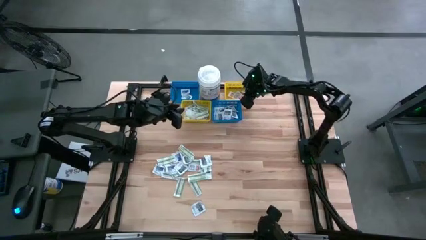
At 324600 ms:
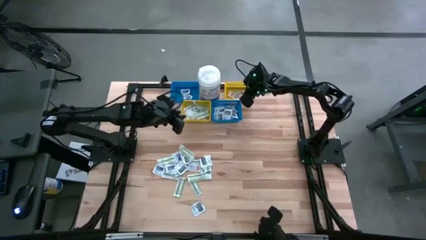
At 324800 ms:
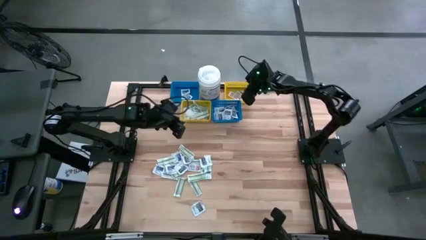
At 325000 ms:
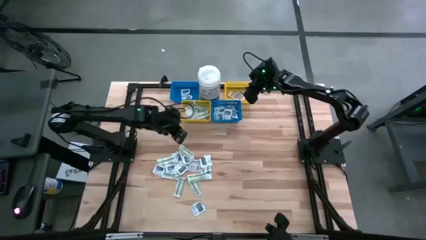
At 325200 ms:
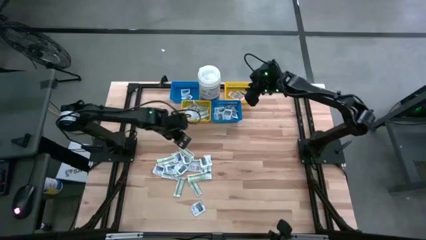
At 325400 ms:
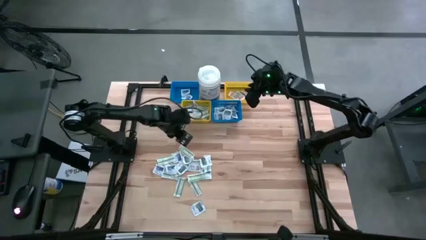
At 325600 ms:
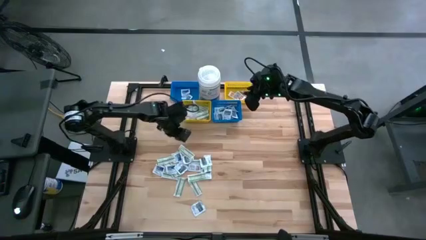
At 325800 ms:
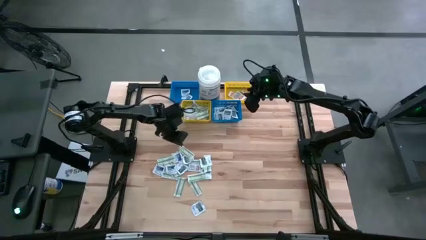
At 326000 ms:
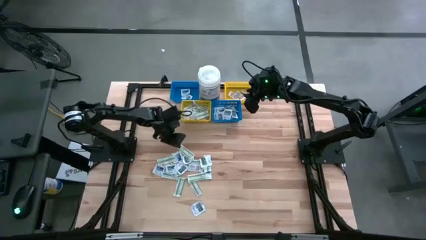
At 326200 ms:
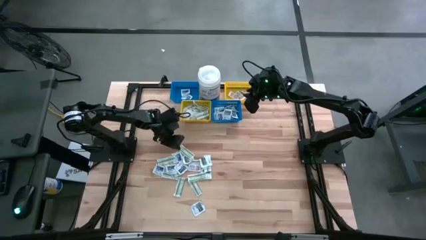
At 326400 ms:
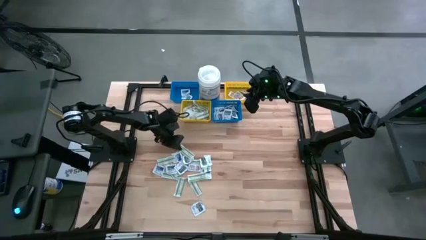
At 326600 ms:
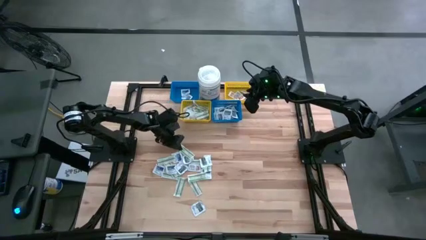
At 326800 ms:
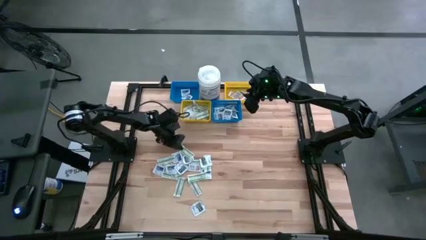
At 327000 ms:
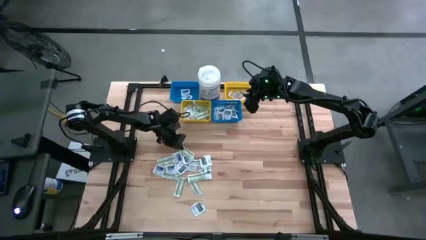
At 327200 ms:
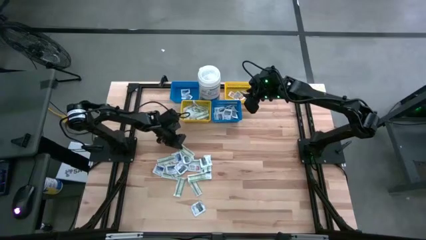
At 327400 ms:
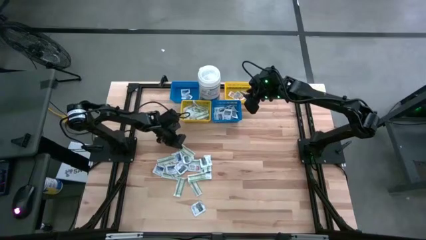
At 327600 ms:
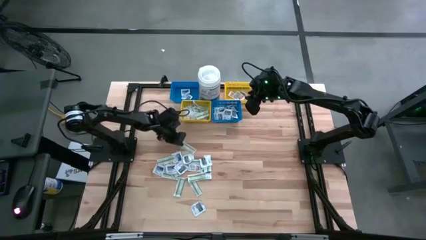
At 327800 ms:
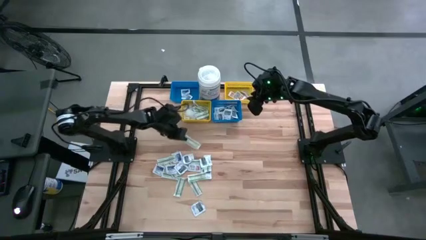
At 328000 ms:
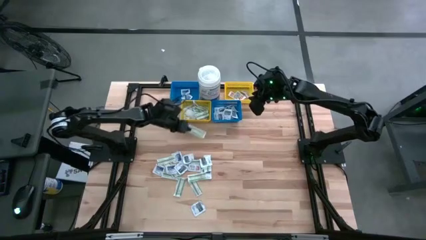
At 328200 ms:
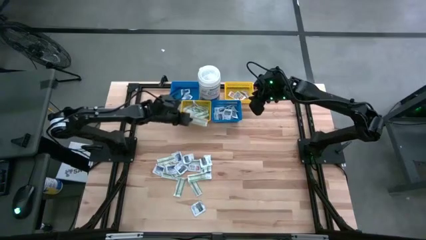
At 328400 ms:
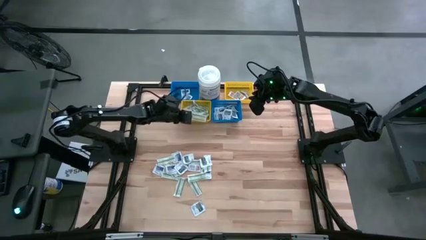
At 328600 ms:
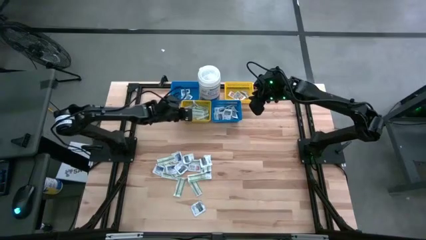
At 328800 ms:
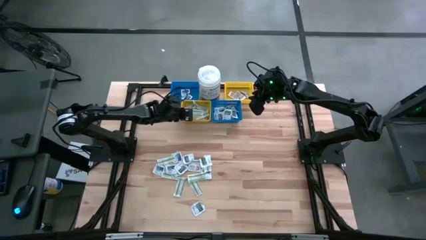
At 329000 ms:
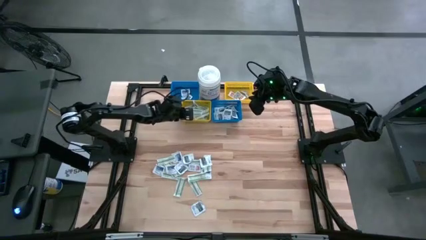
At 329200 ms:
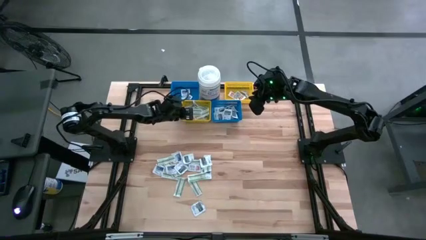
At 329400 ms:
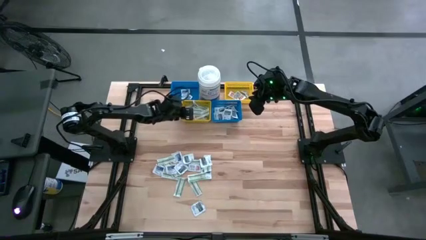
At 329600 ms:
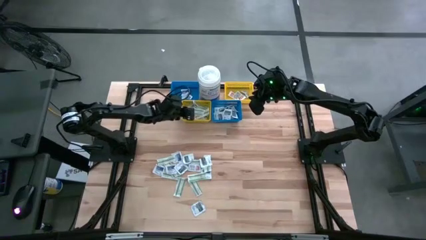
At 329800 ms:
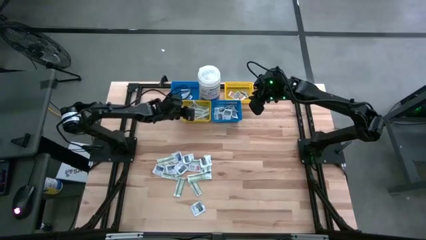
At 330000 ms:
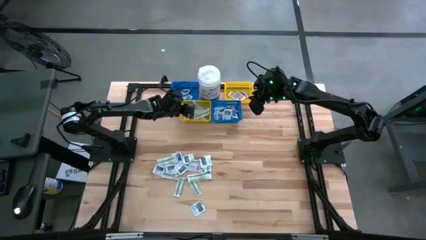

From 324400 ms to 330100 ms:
Task: Pick & Place First Aid Supplies
Put the green bandage pad into the left yellow bin

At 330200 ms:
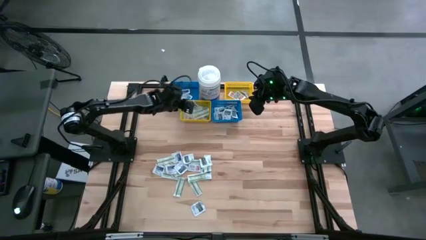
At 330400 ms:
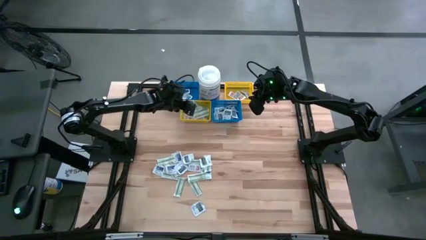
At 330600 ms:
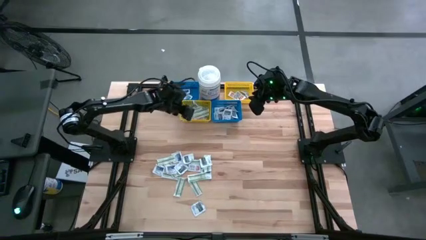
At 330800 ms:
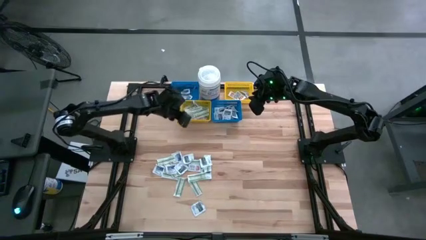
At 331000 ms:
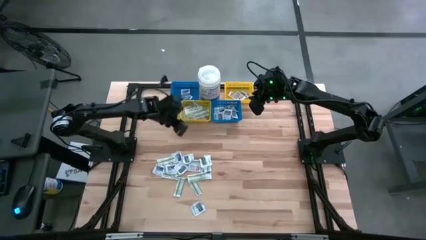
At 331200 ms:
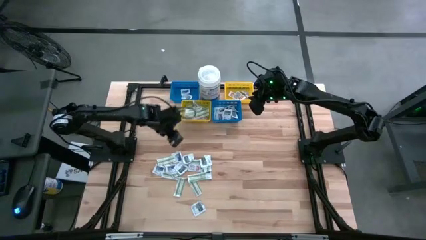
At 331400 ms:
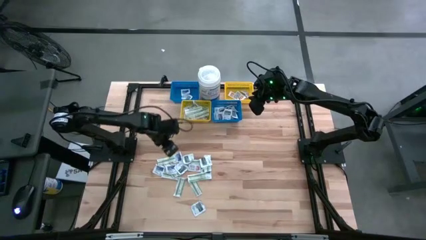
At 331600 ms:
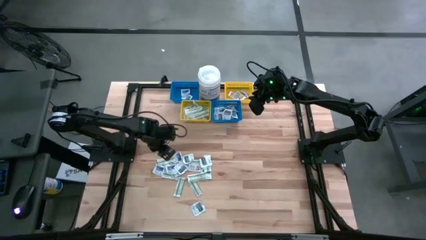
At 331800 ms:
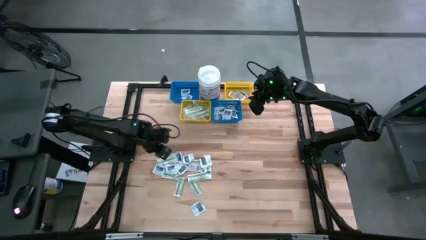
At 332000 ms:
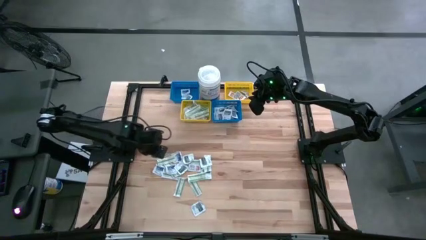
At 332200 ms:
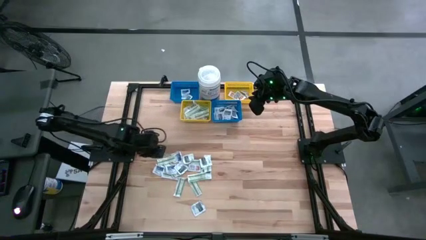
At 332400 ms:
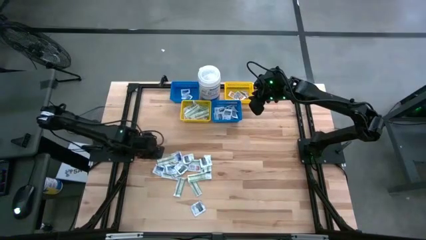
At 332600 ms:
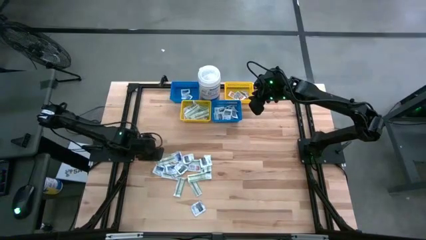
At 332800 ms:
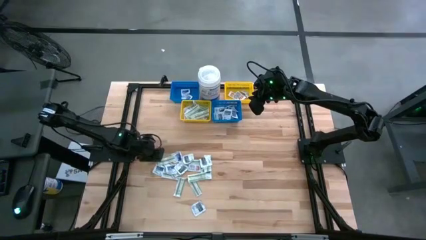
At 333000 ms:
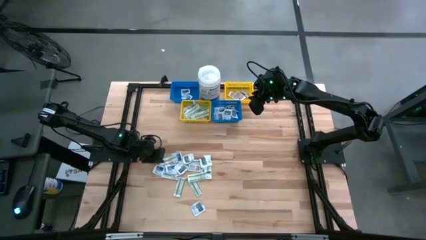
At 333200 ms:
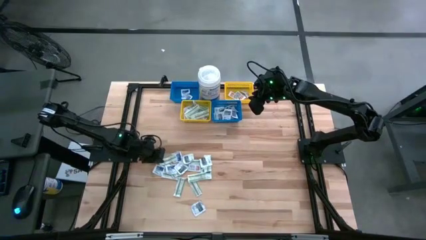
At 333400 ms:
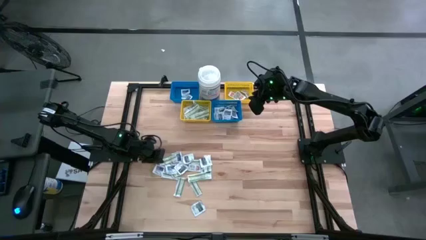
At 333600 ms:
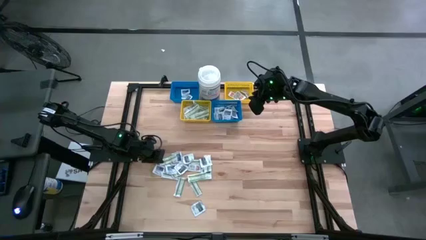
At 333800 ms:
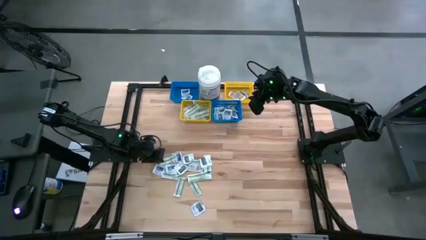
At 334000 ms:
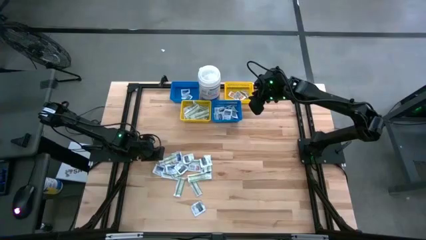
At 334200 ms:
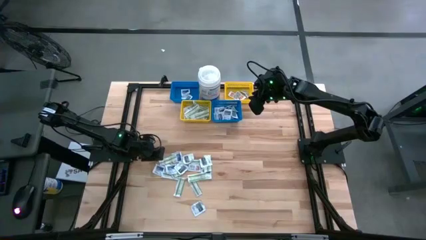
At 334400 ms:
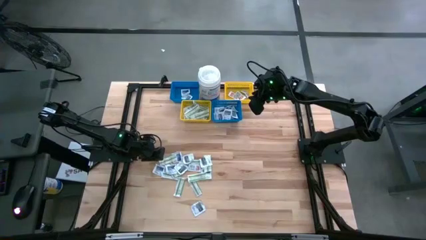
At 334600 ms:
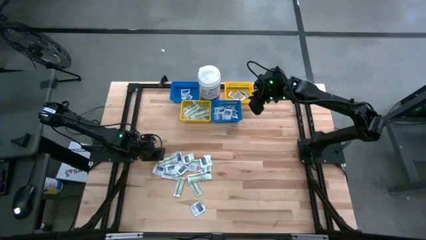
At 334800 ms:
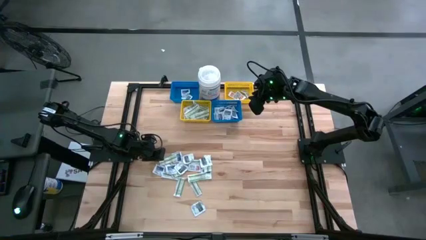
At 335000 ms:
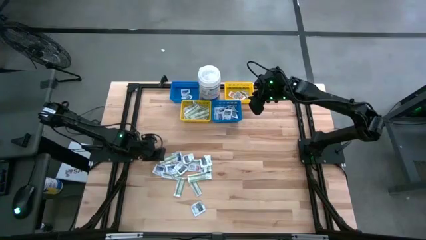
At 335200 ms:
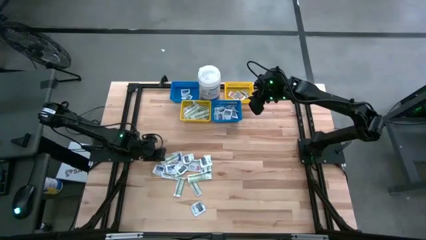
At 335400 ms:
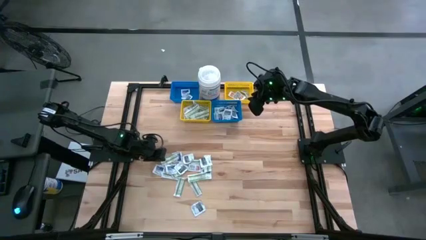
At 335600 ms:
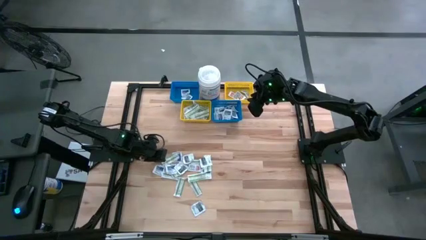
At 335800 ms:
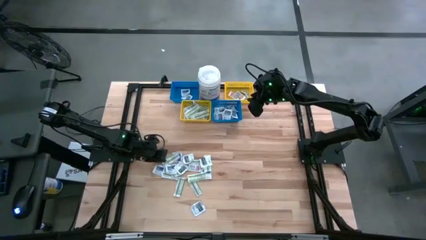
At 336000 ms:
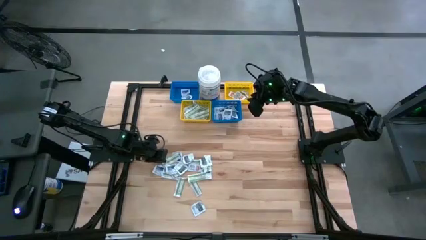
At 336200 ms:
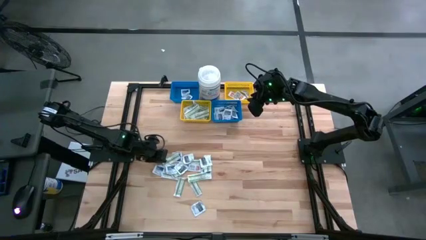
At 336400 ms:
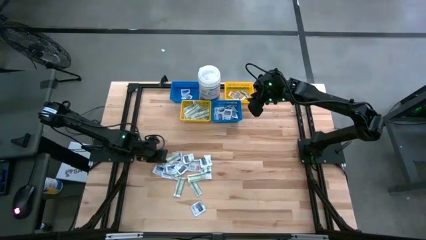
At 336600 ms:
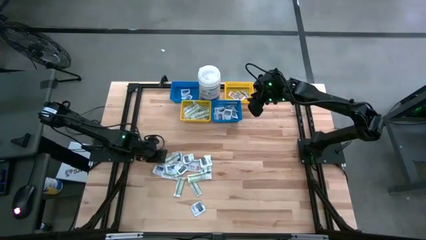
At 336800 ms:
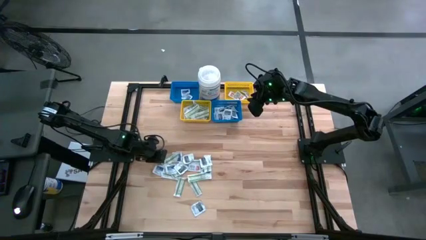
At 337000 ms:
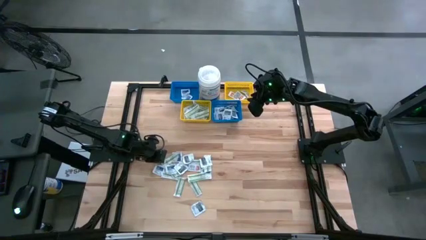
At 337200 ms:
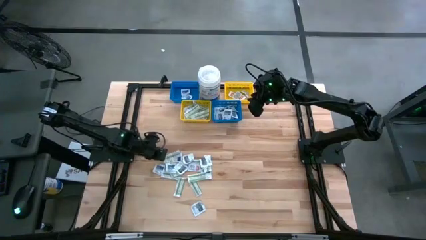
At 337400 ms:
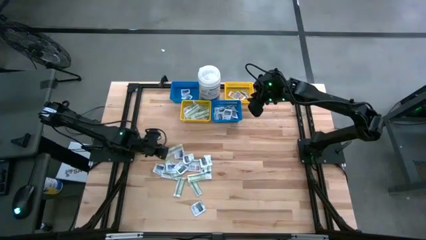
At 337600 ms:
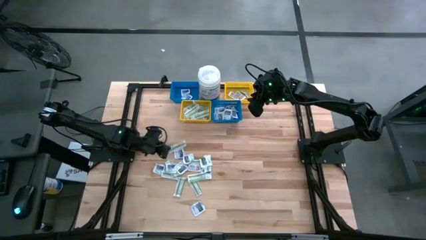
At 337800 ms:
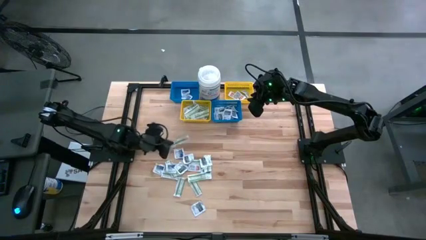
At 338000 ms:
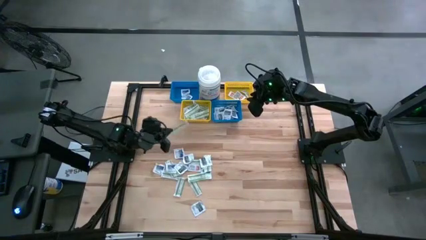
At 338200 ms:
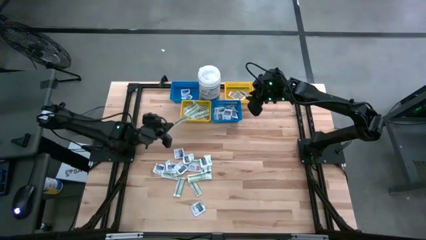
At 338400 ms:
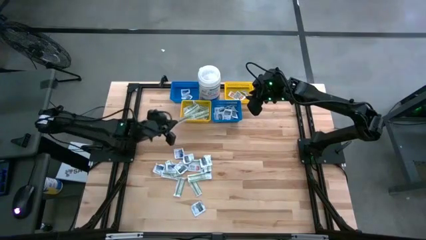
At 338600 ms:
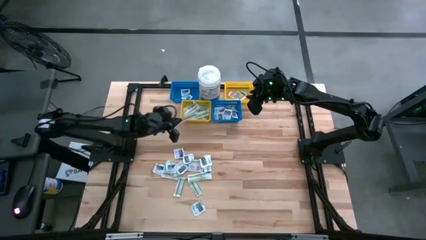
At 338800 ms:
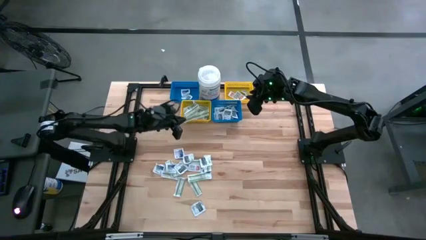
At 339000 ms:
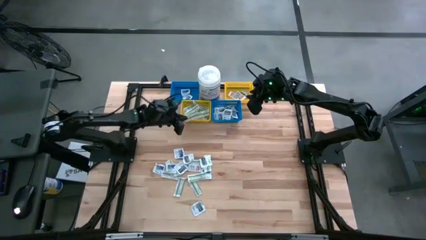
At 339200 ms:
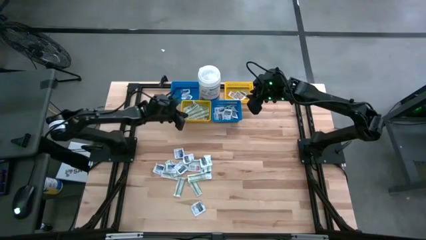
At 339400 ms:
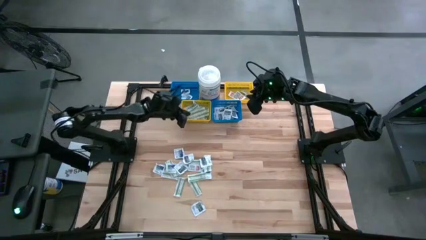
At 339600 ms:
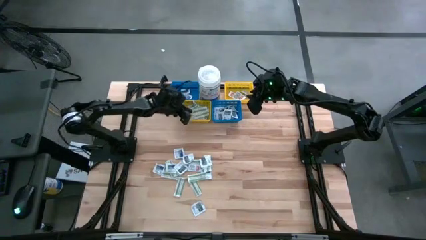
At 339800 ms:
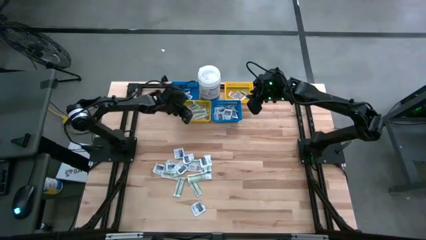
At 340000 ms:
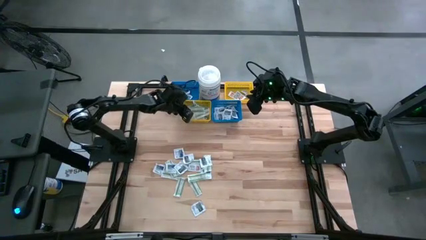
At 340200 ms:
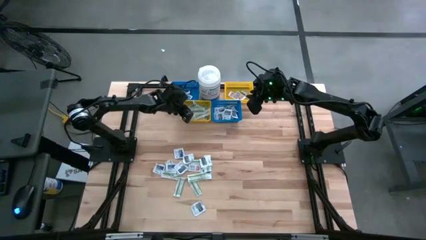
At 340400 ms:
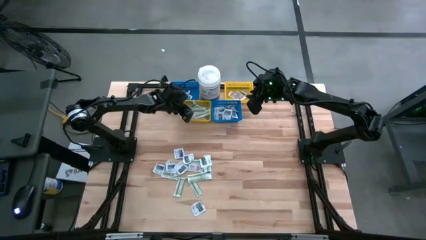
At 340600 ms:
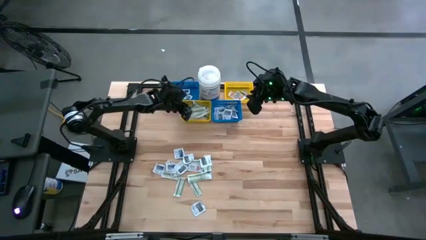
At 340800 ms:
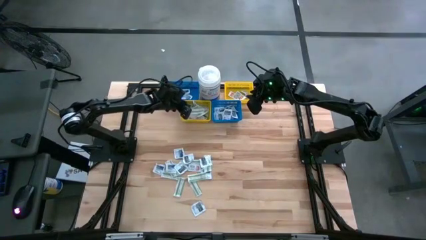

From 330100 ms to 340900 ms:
Put the green bandage pad into the left yellow bin
